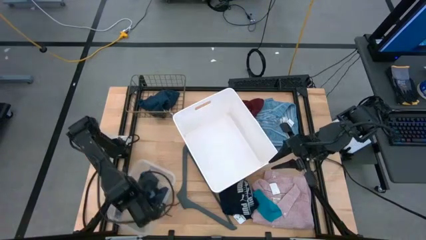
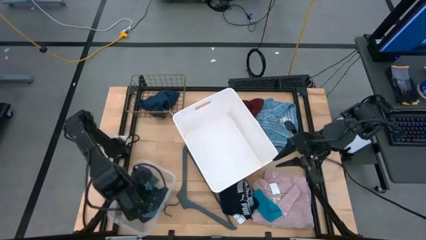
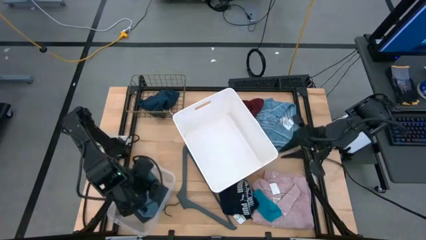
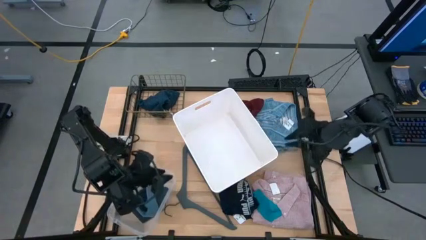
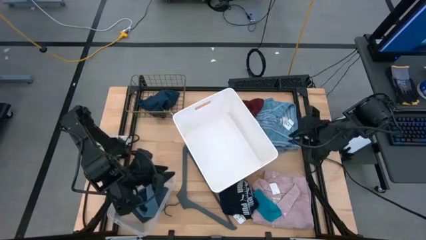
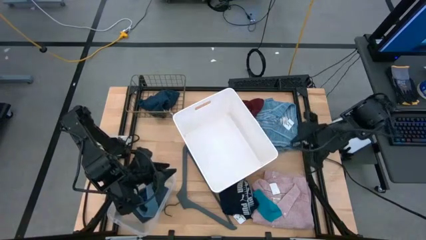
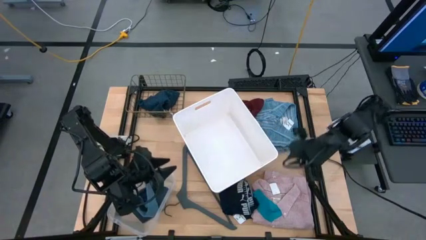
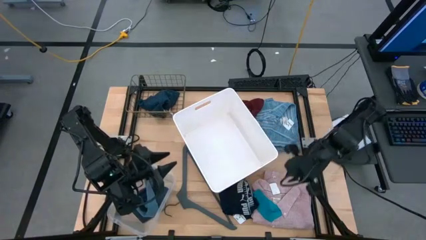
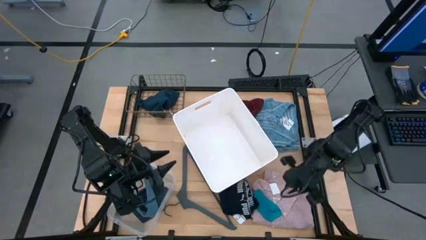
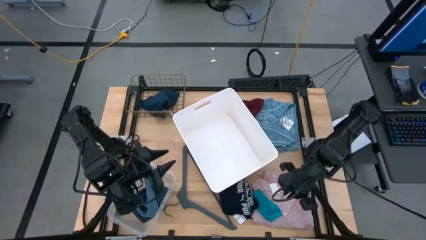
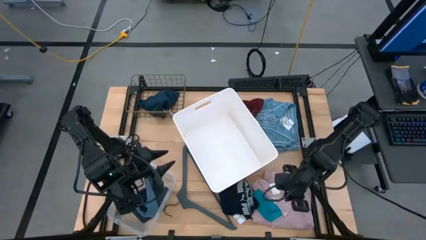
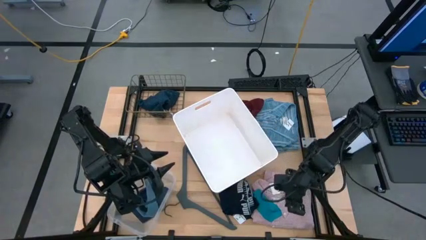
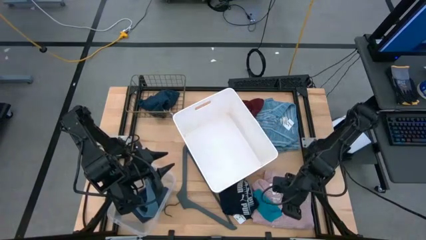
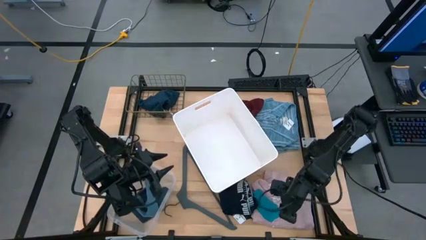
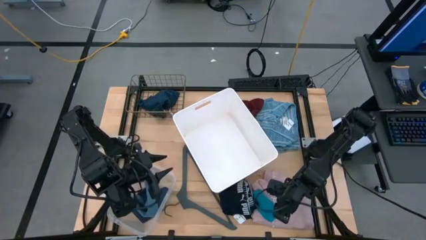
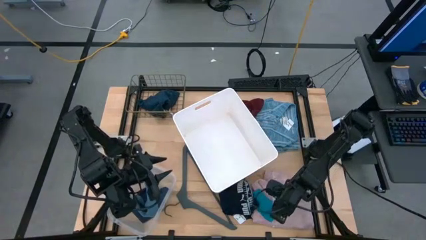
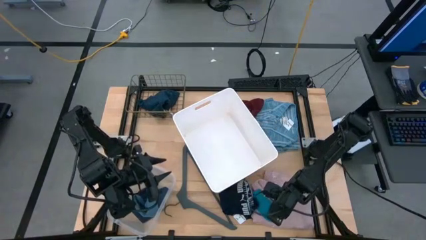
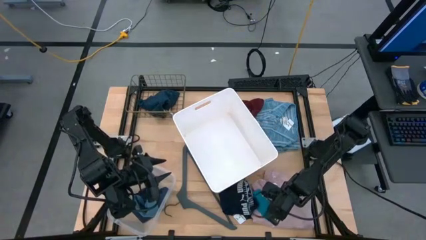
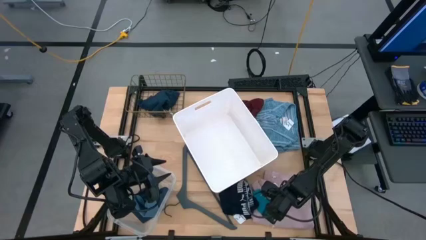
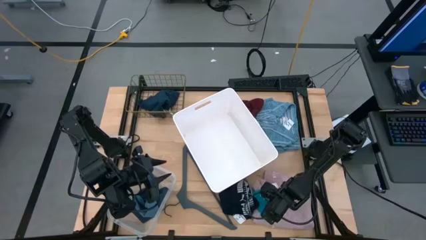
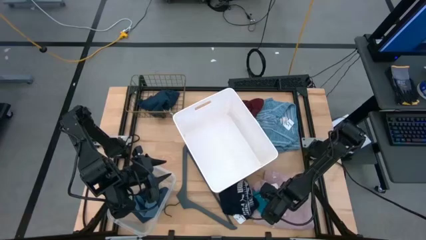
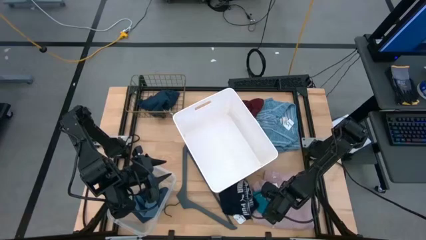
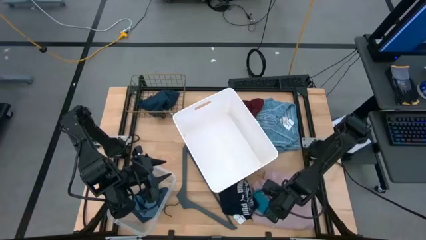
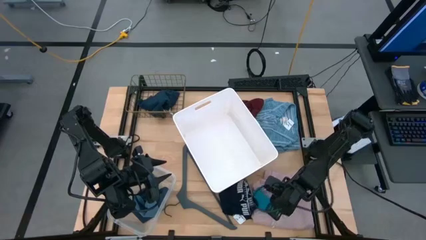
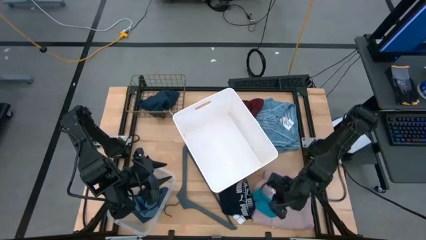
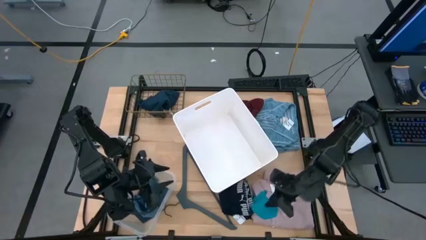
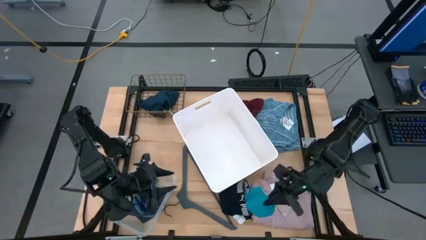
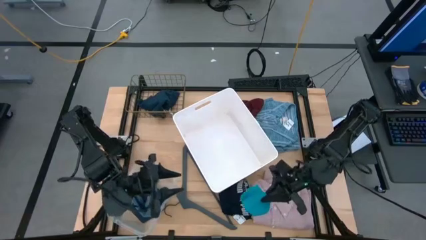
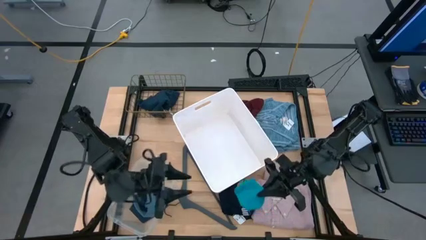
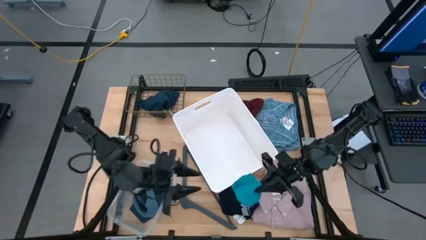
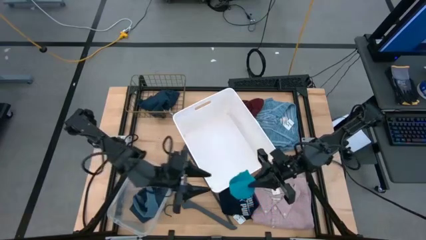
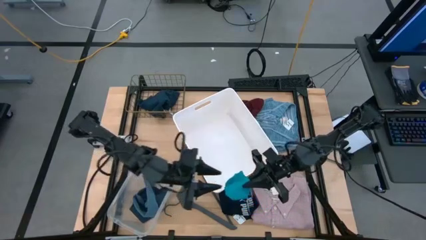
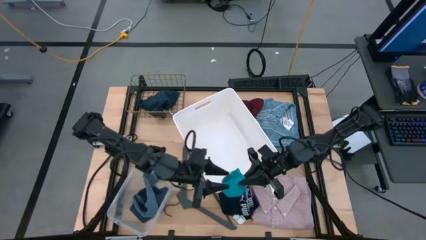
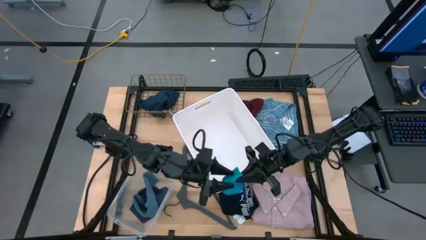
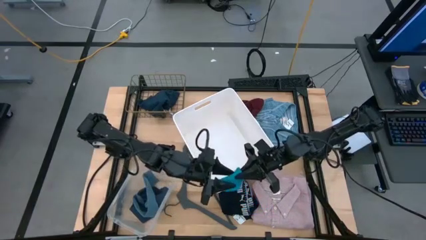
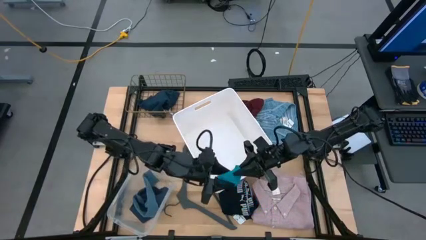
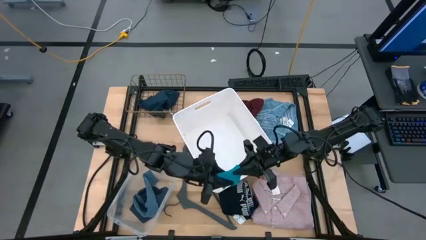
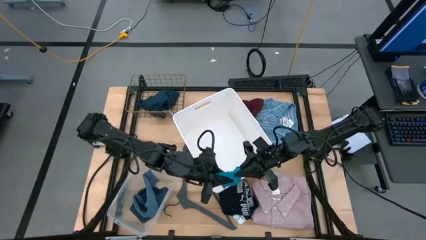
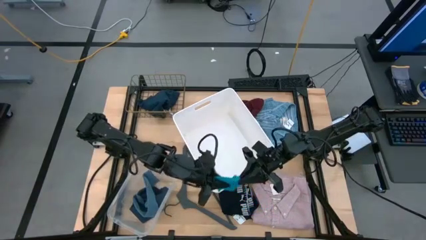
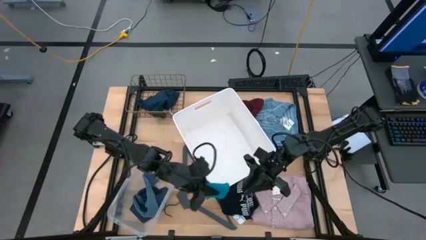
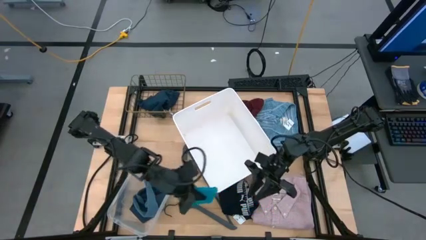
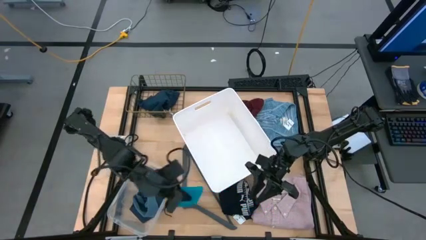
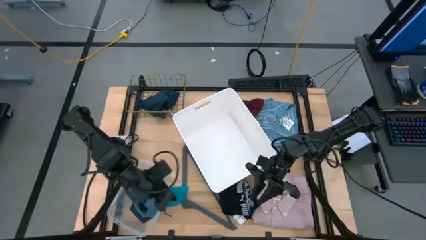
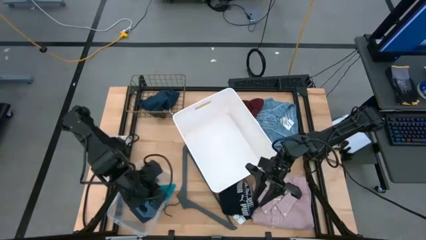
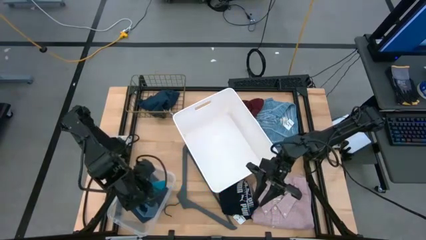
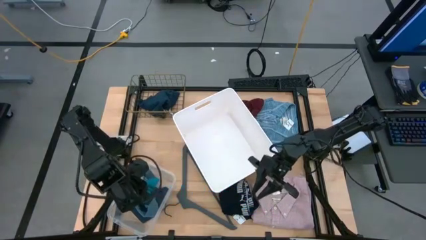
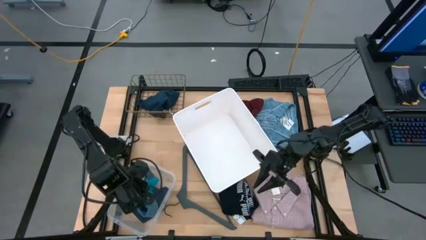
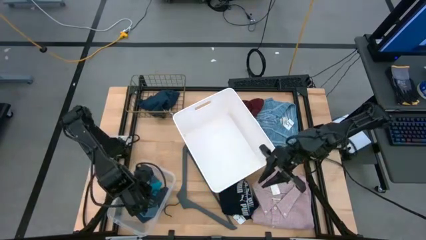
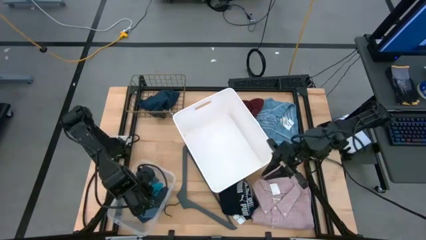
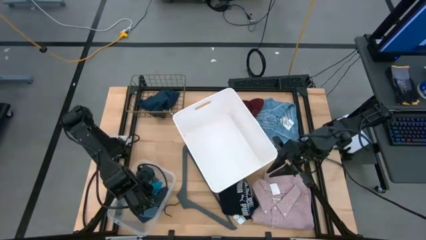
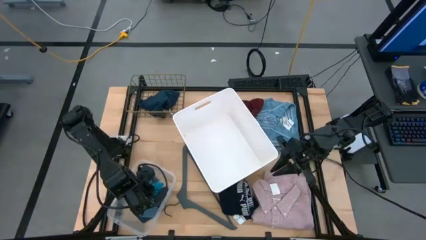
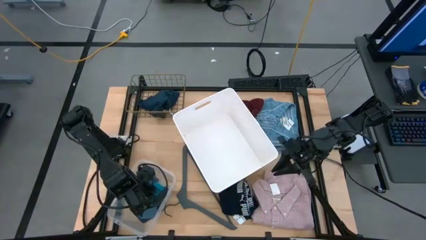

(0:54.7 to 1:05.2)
Task: Pick & Place Cloths
Put the light blue sock into the transparent bin

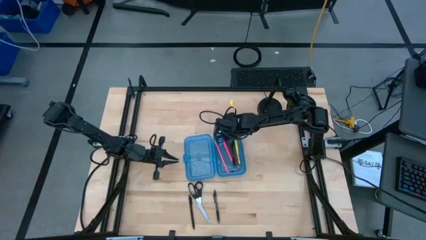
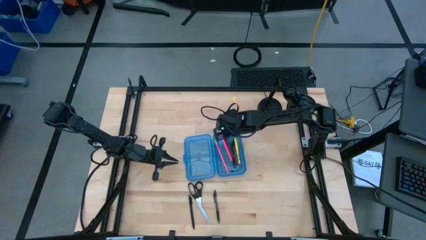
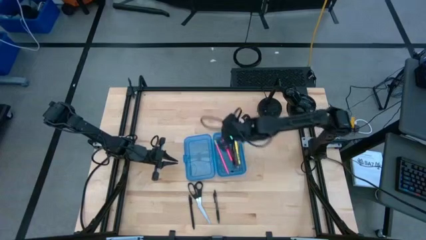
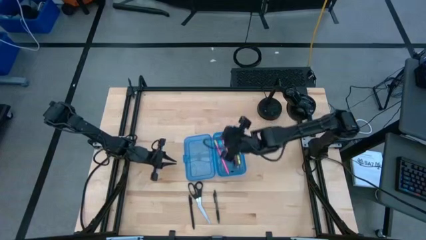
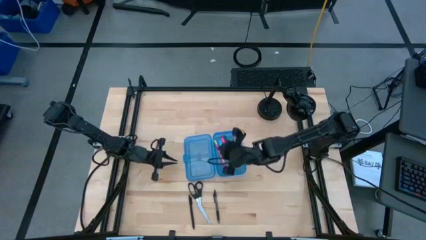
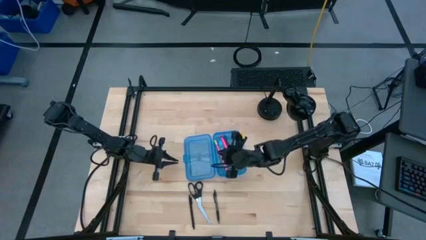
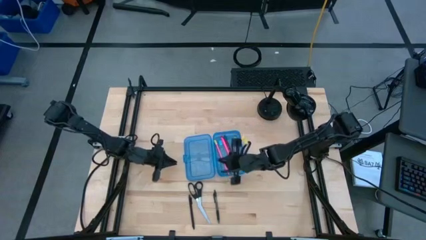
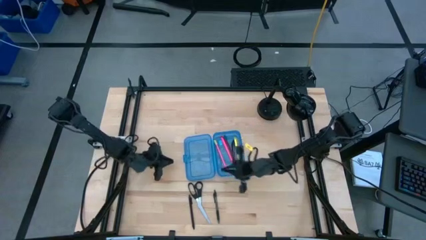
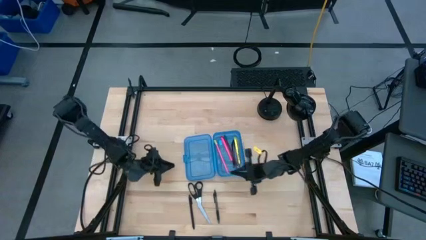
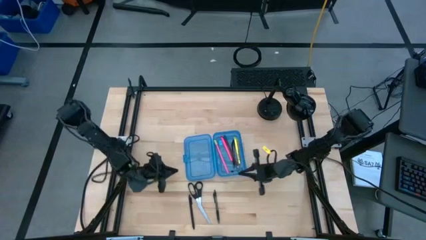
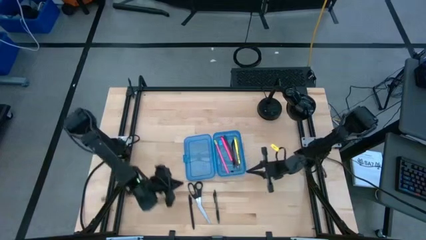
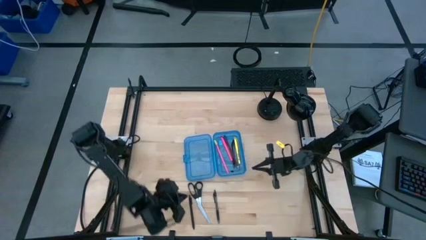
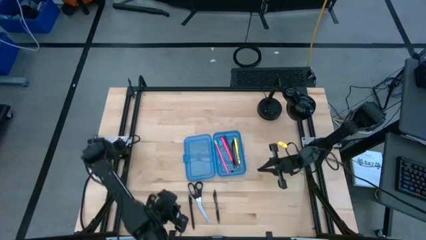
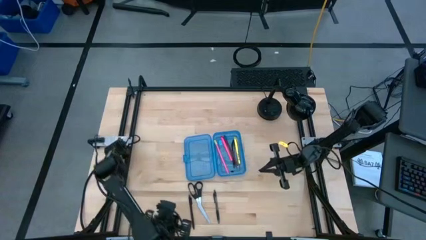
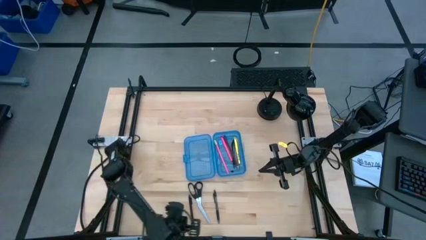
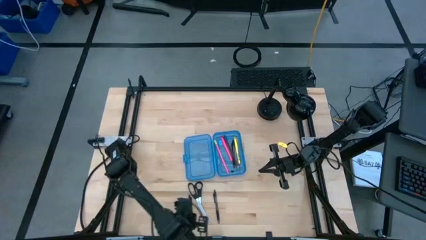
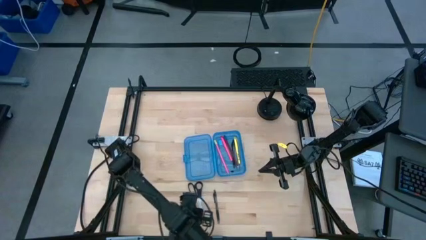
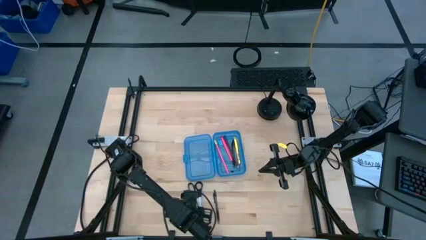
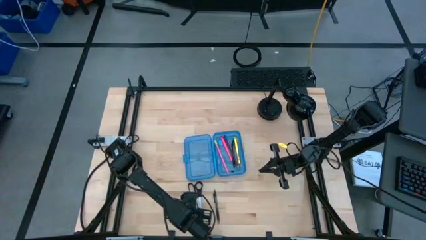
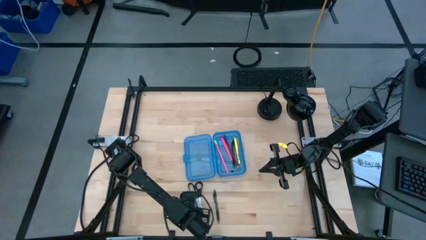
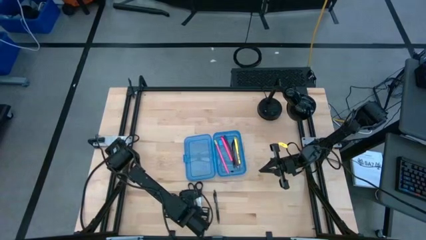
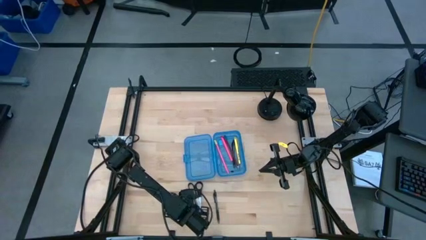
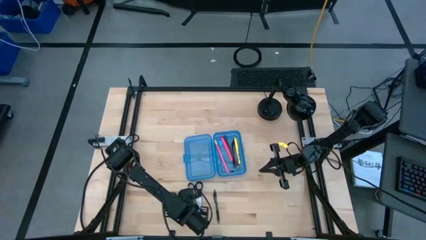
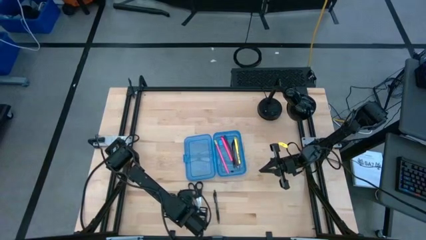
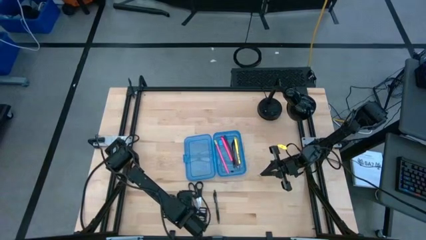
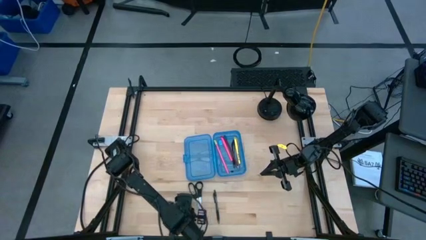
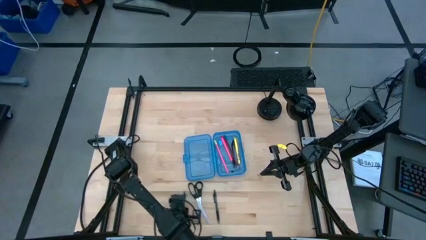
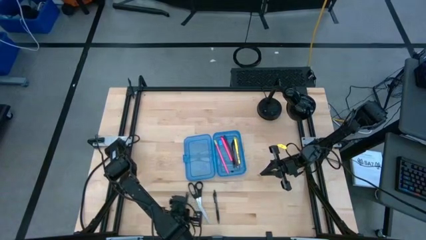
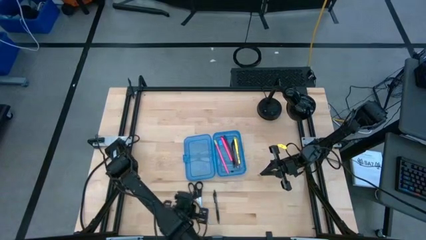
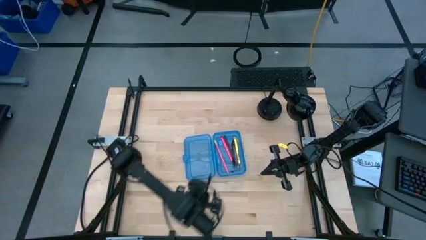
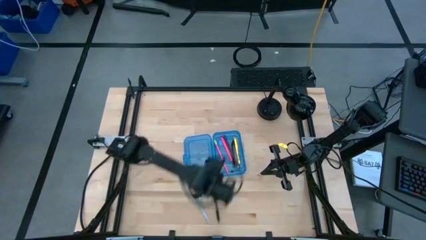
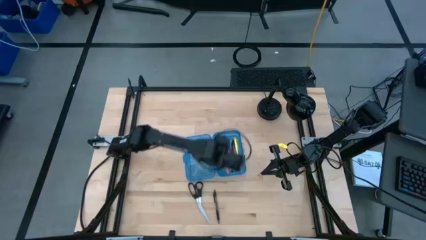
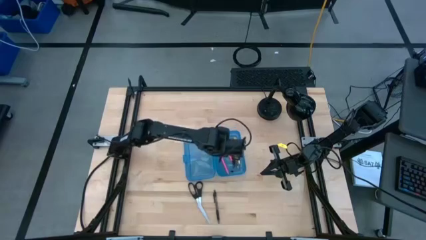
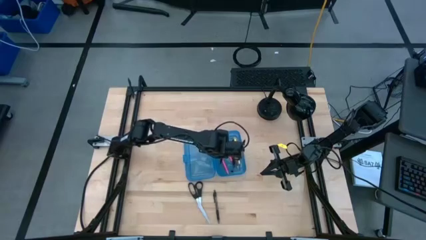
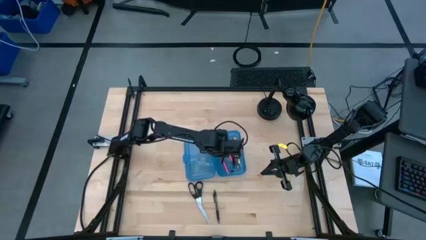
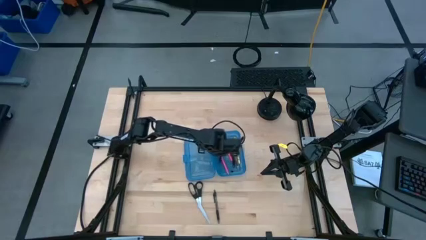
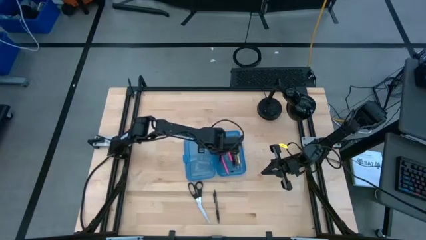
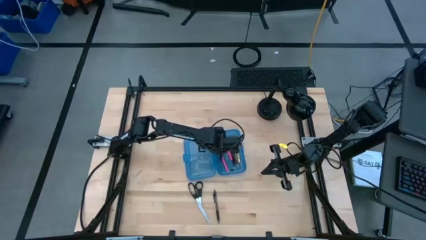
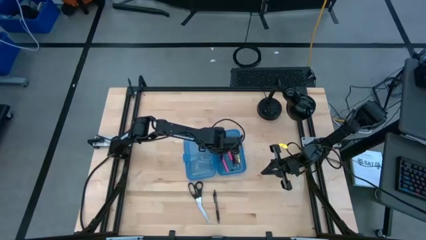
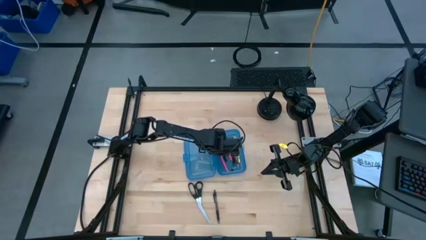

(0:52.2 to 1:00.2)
Task: Pick & place school supplies into a supply box
Put the black pen into the blue supply box
